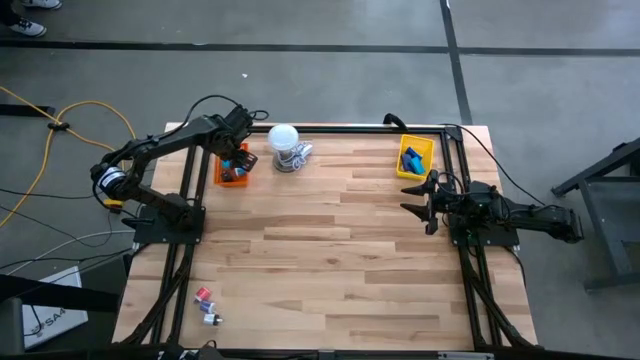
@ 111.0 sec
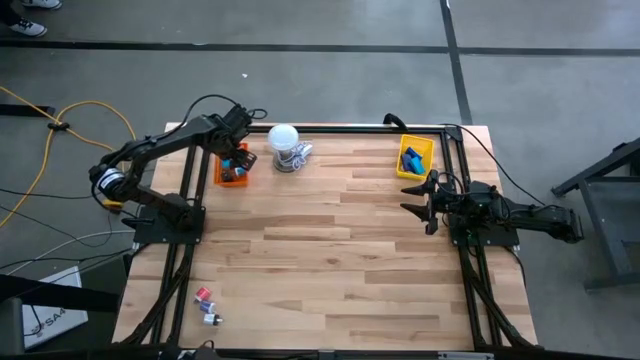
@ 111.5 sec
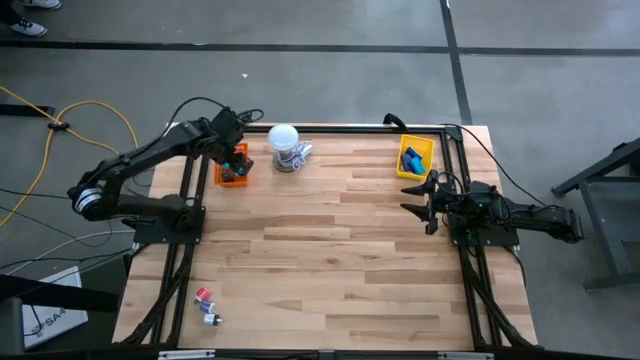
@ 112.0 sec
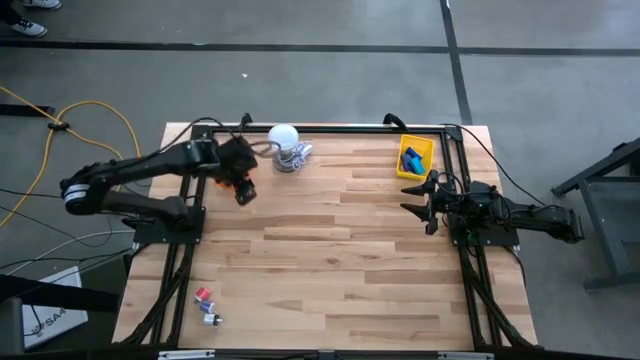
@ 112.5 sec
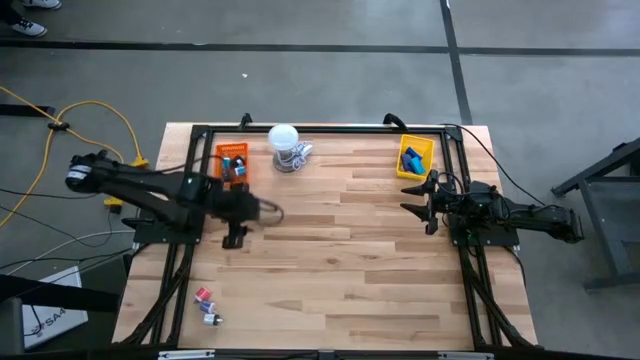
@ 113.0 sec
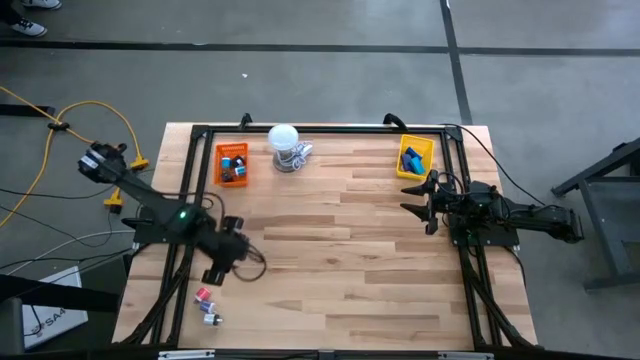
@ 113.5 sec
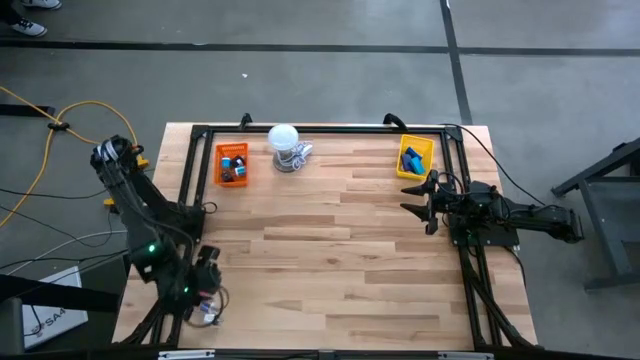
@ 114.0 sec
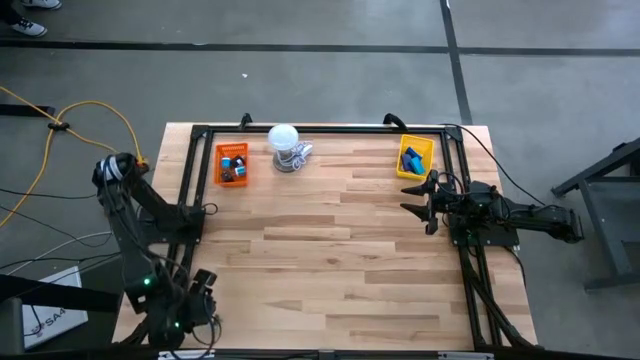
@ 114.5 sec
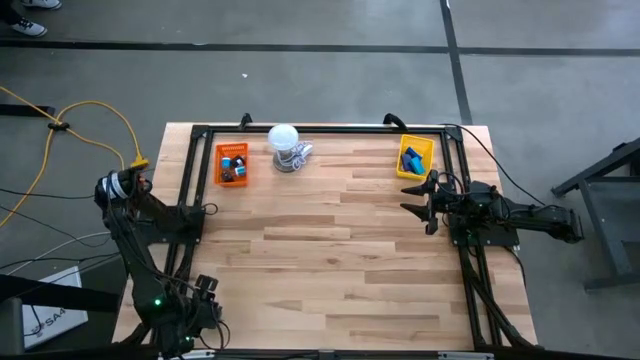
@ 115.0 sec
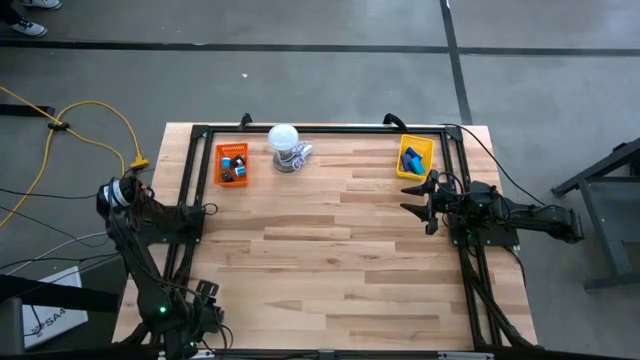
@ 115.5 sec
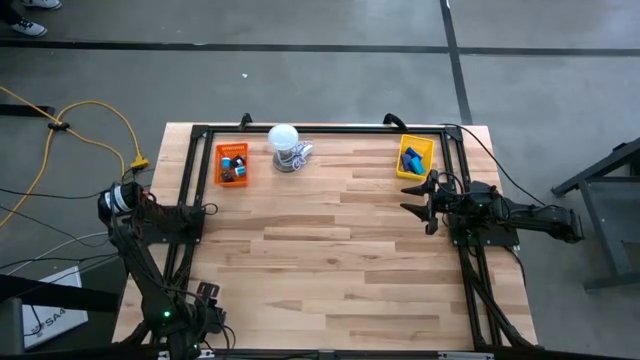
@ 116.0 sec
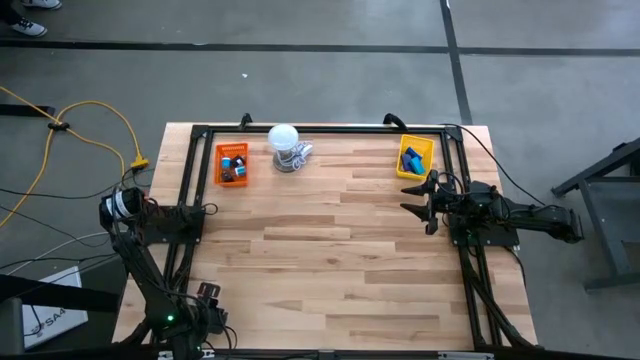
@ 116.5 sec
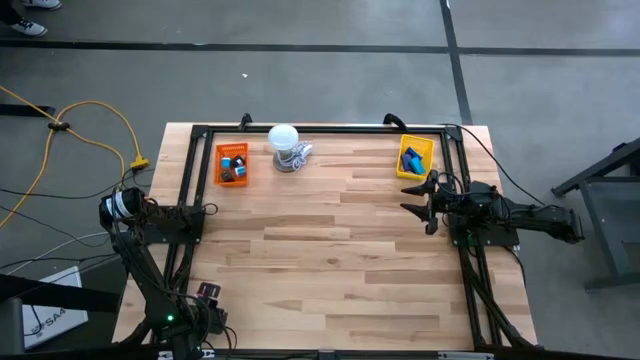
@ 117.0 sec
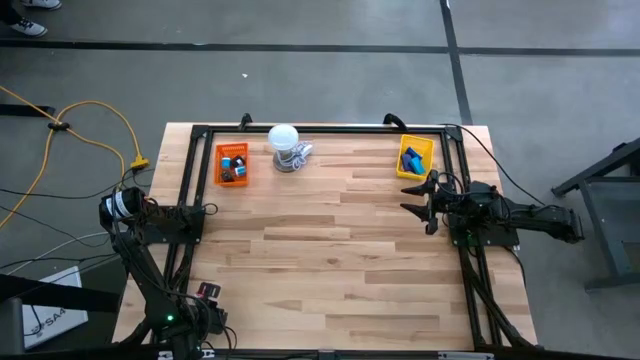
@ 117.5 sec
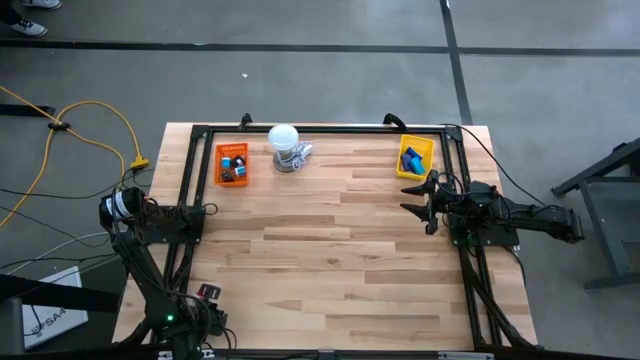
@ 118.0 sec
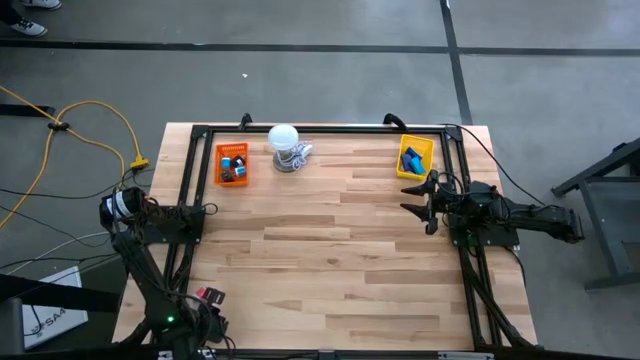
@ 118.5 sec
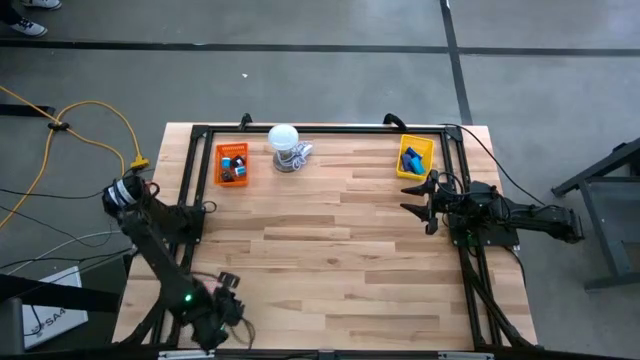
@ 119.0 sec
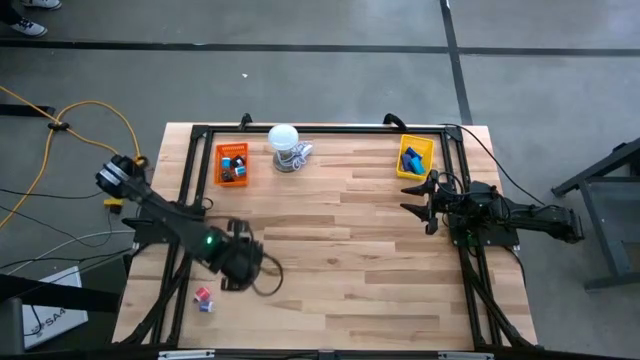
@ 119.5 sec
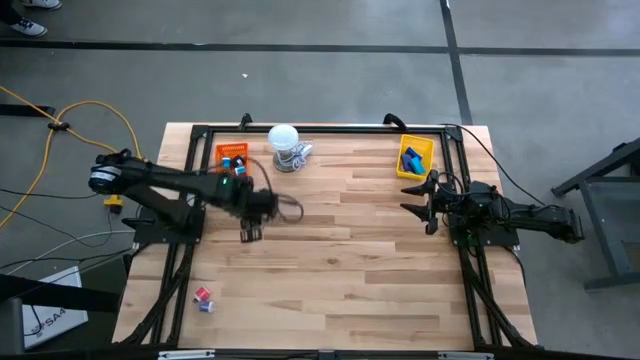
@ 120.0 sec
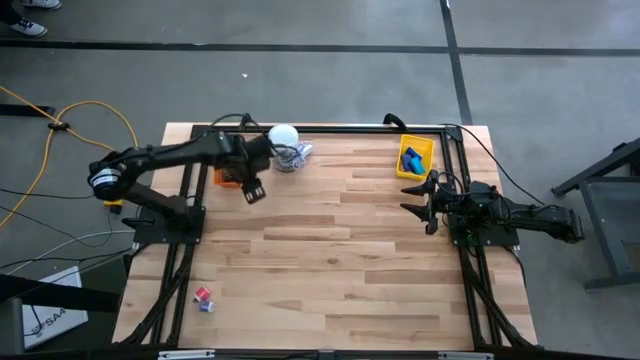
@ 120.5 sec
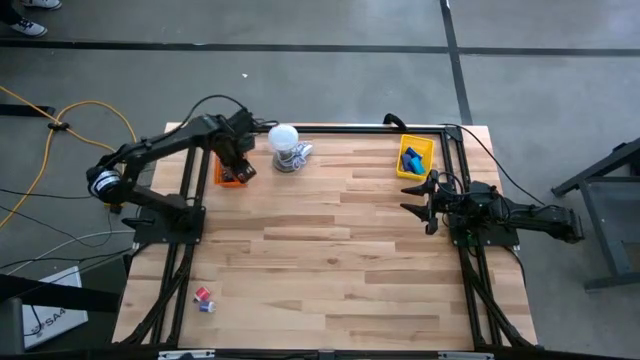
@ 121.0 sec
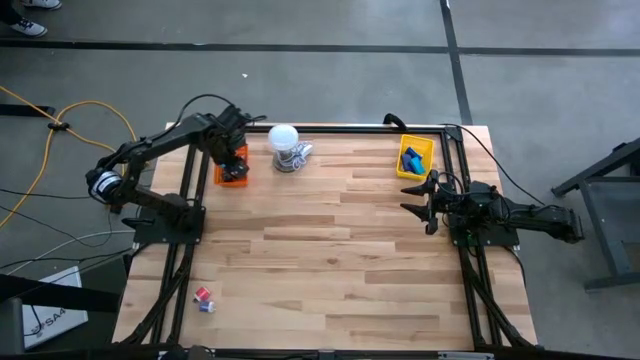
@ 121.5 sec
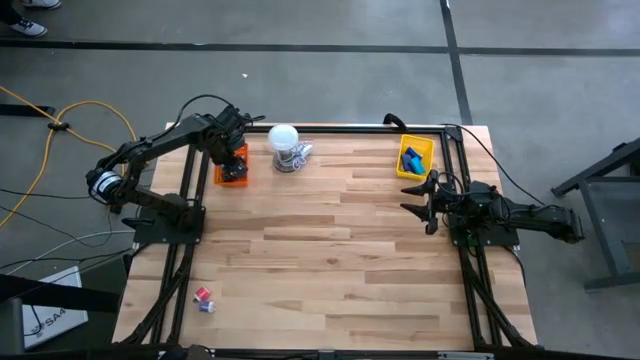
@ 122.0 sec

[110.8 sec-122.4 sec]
Task: Pick & Place Office items
Put the white charger adapter into the orange basket

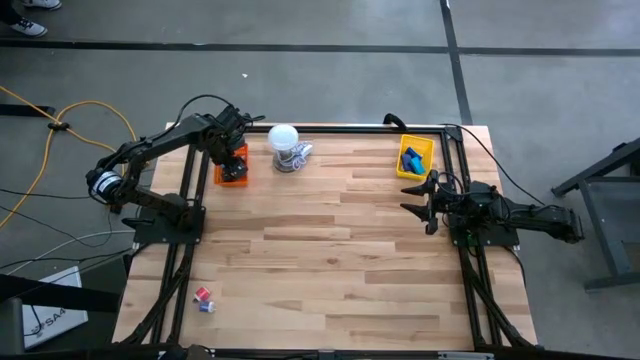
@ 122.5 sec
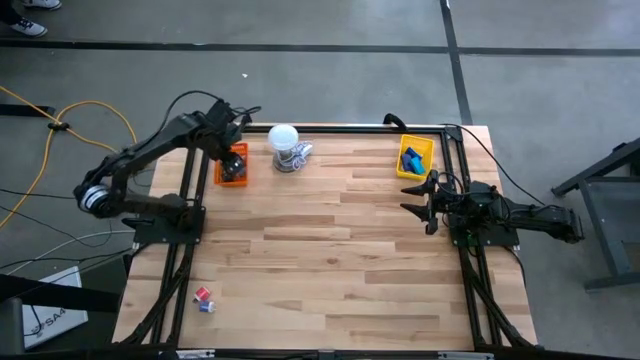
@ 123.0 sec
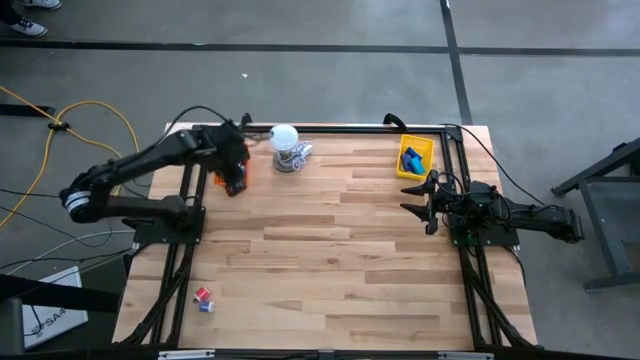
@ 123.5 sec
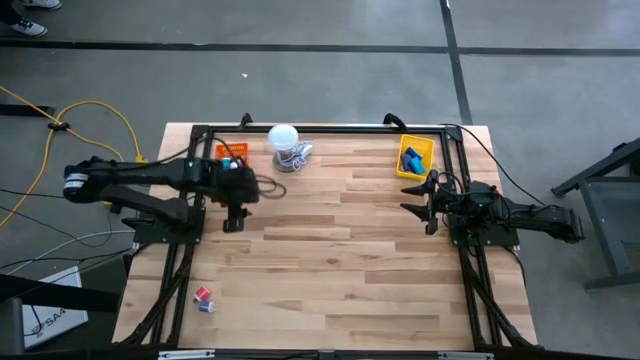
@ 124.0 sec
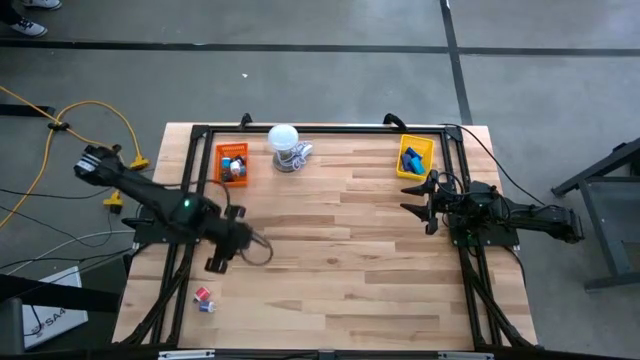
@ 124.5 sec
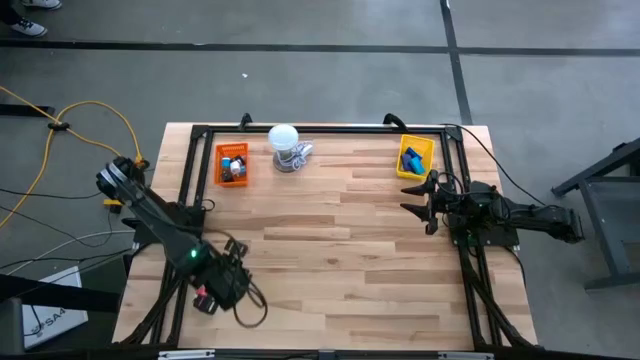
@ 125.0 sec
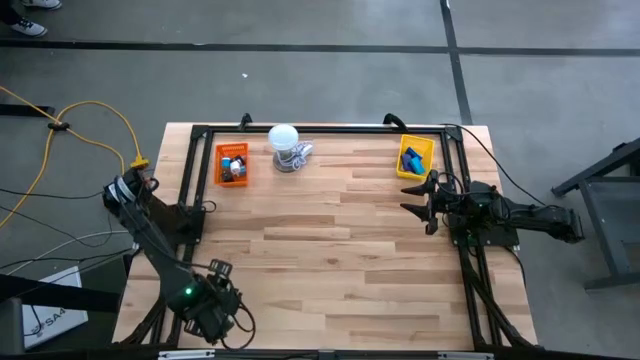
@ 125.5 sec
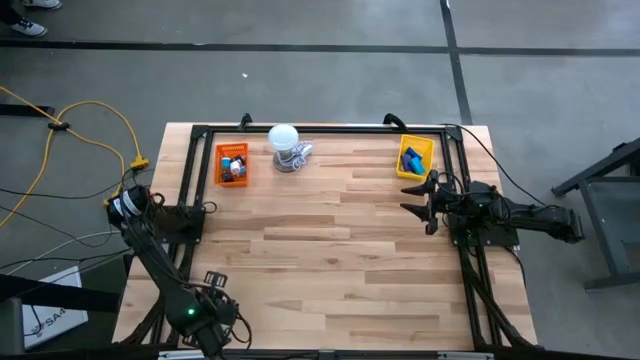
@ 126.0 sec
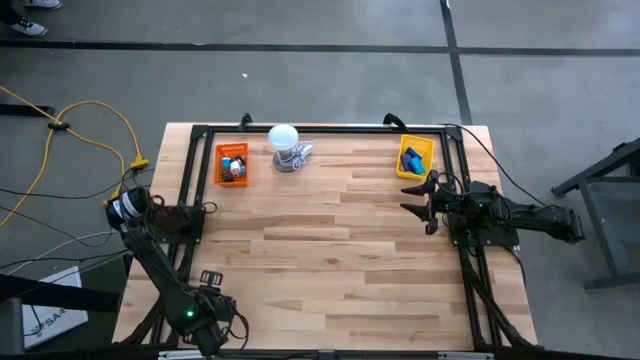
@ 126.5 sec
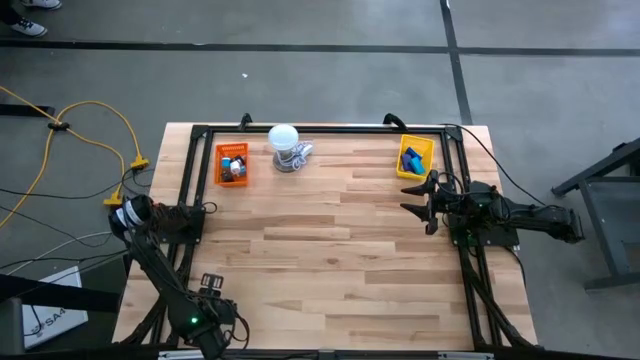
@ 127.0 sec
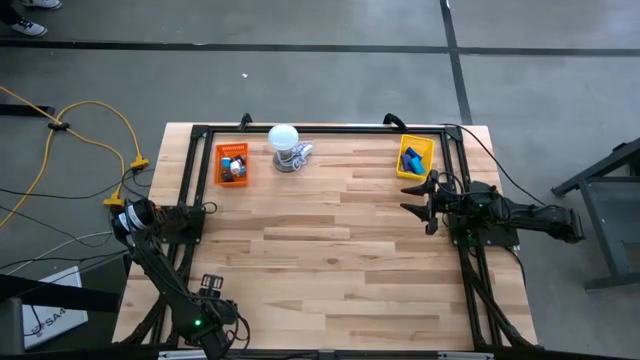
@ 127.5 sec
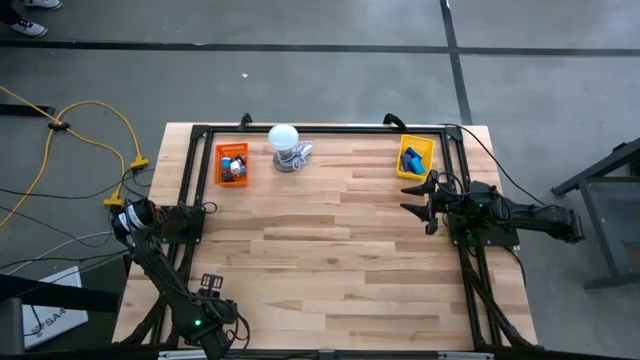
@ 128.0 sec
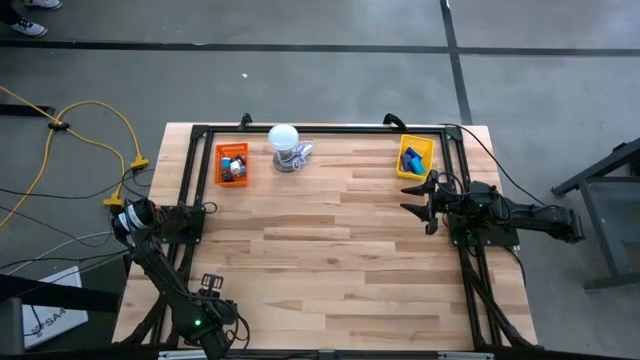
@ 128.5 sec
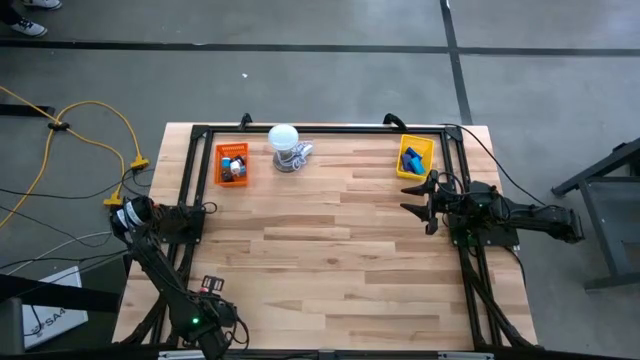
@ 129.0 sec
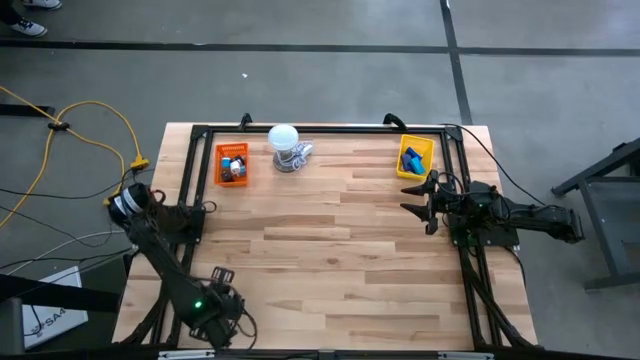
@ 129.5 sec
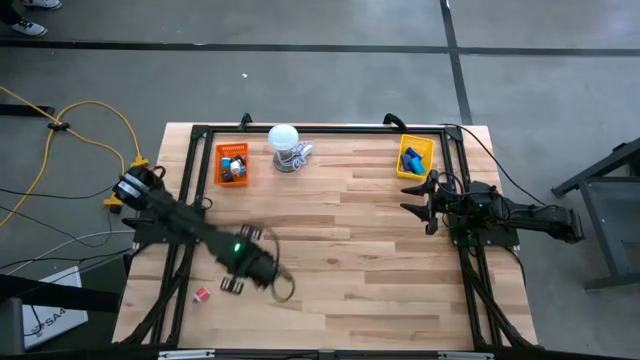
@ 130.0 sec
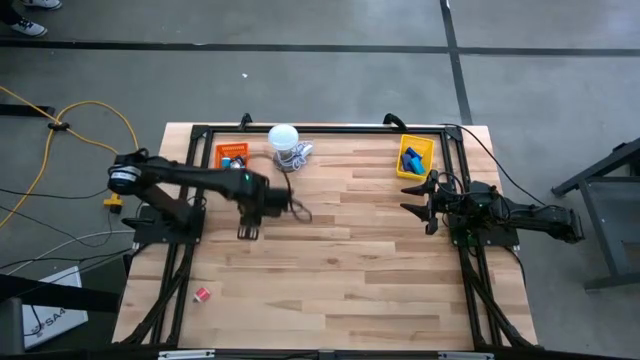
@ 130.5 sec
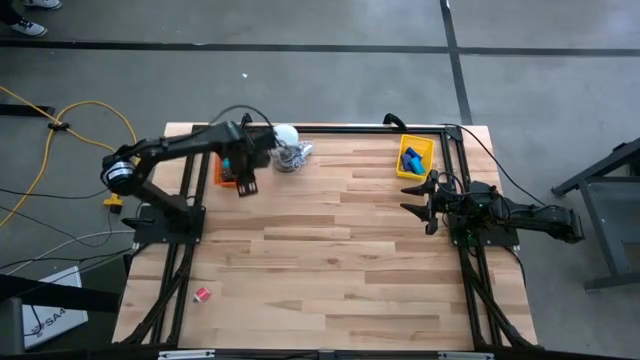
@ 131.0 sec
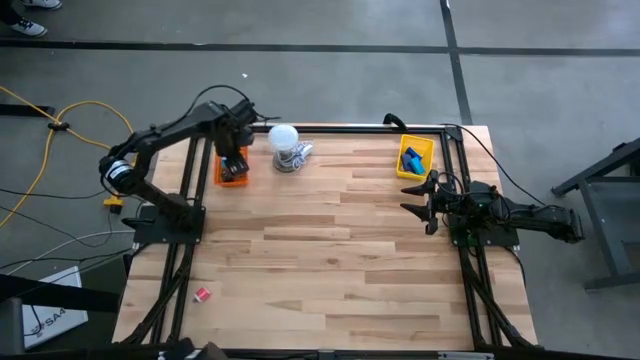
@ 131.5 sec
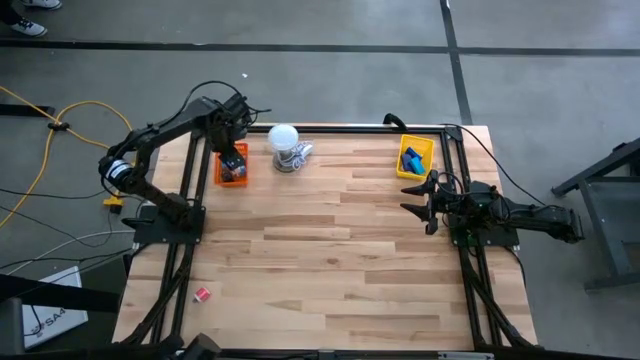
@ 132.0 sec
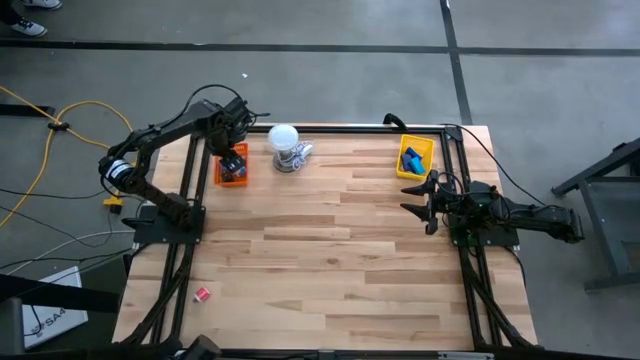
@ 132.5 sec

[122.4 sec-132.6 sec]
Put the purple charger adapter into the orange basket
